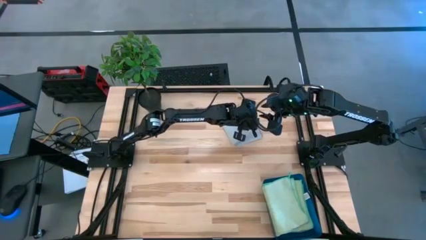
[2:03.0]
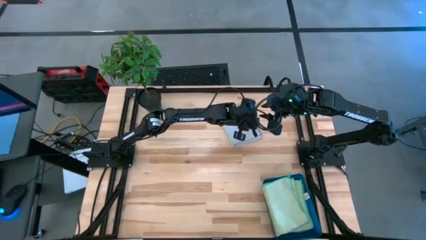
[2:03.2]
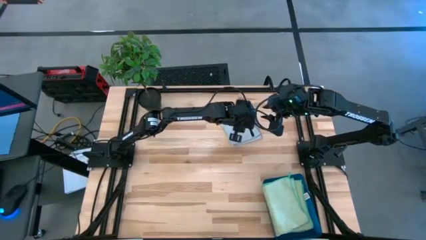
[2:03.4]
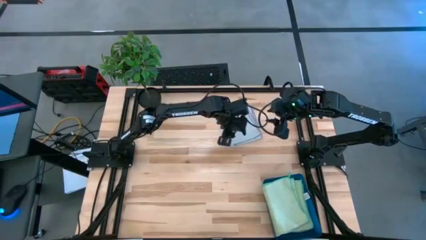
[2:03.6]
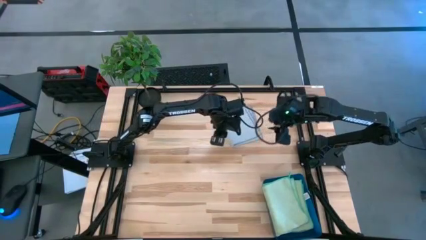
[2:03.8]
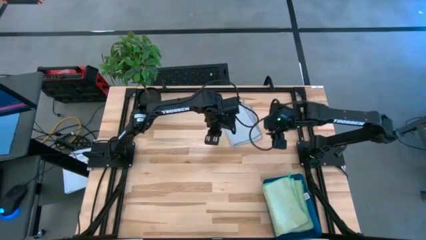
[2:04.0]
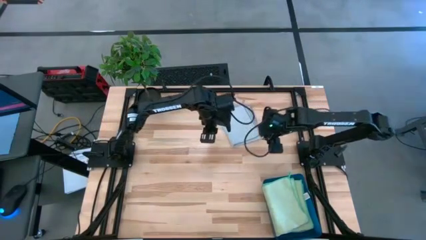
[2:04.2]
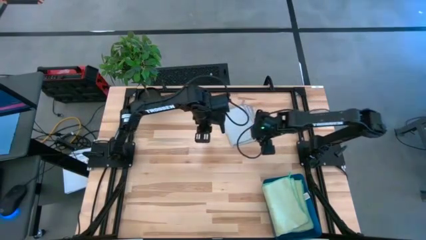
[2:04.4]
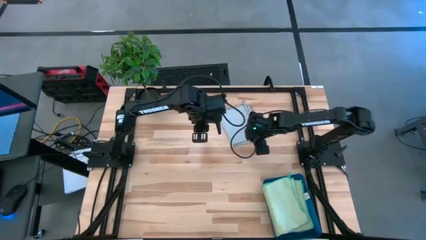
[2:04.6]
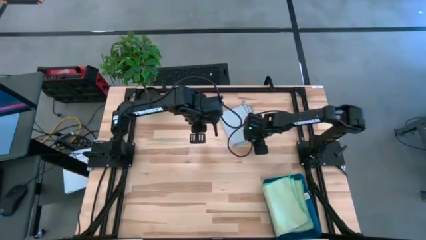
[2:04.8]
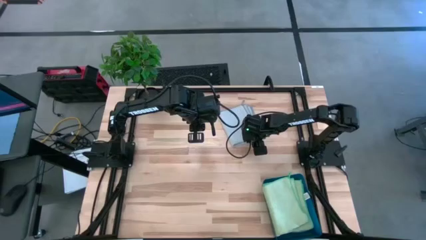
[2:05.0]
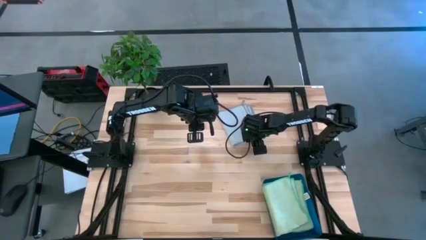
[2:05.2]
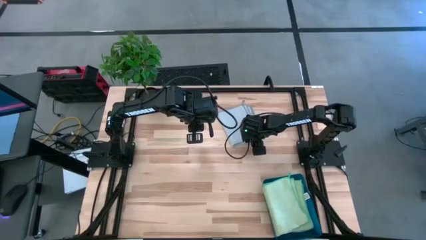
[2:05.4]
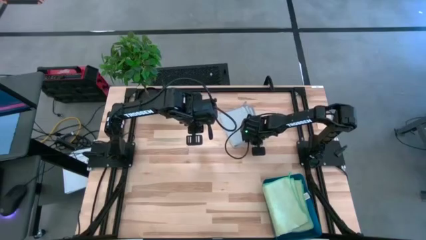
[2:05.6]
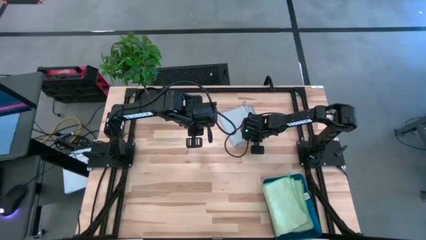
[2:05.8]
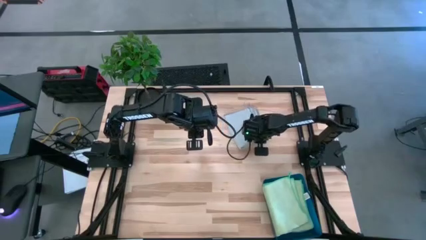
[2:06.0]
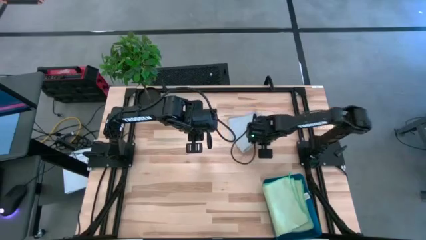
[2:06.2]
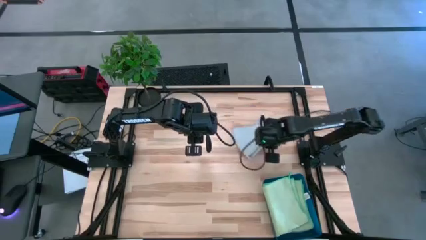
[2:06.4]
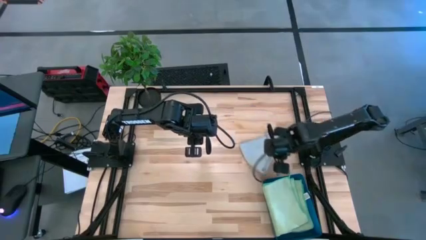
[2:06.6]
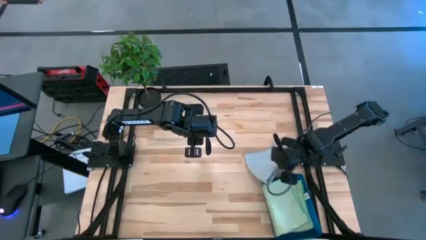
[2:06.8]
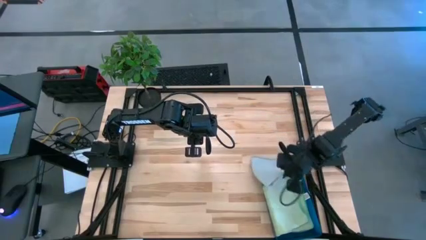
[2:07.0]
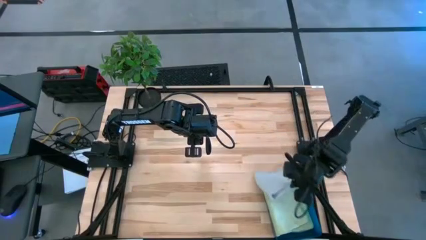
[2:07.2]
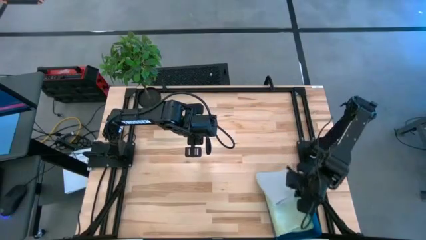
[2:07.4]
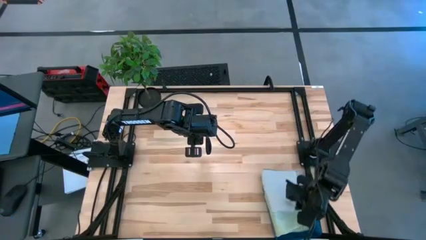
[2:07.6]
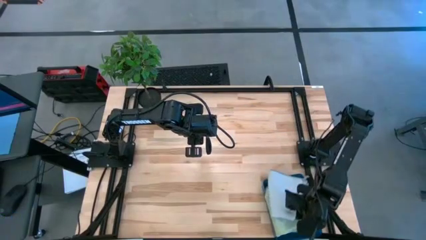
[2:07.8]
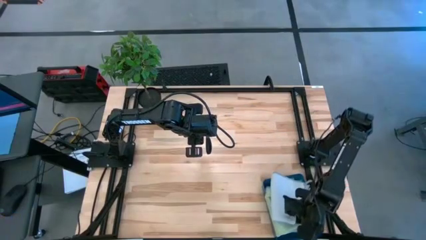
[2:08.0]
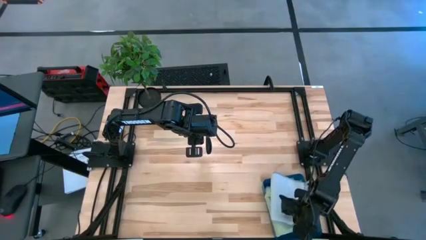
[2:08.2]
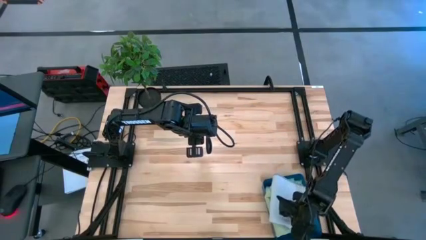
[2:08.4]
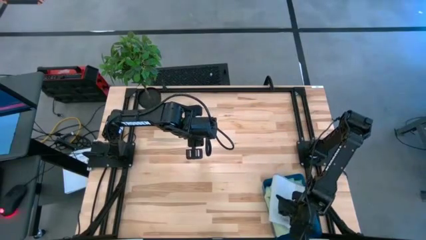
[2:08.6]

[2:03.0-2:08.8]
Task: Fold microfiber towels
Put the gray microfiber towel into the blue bin

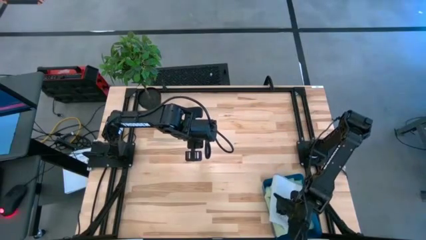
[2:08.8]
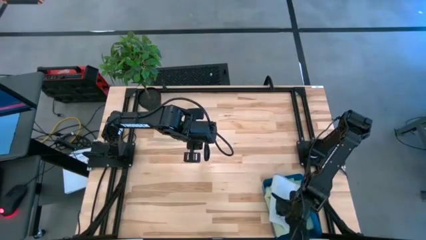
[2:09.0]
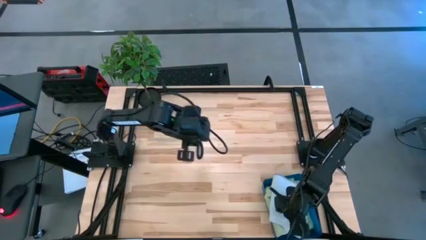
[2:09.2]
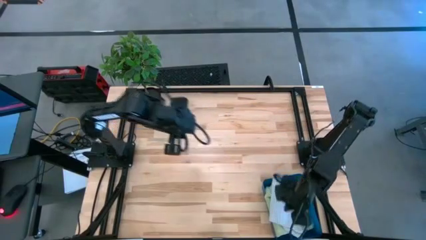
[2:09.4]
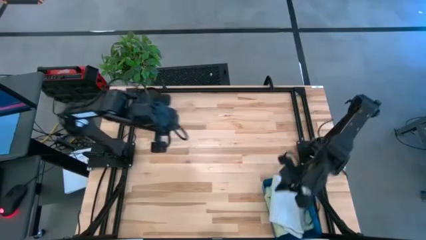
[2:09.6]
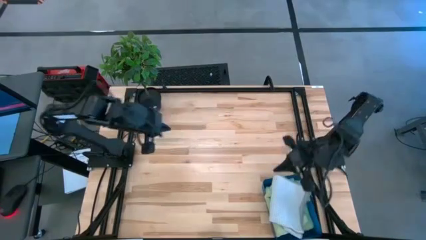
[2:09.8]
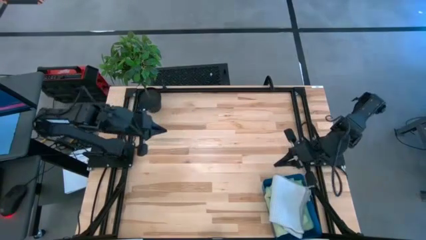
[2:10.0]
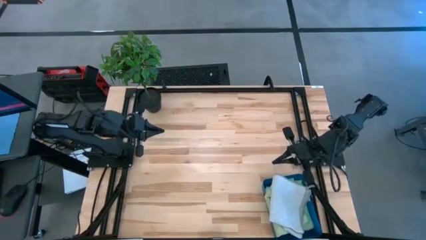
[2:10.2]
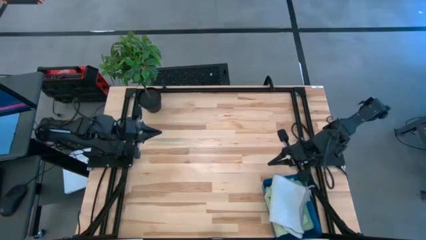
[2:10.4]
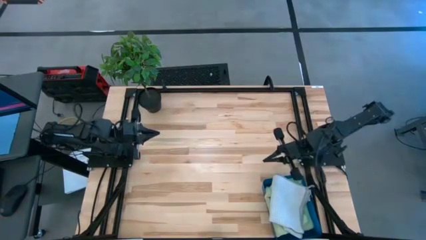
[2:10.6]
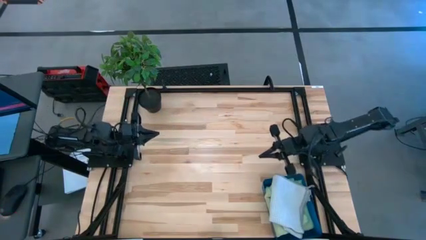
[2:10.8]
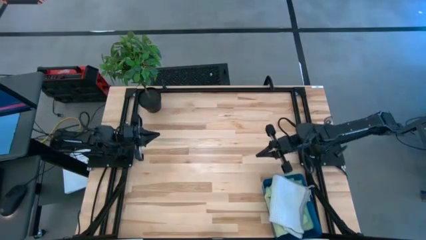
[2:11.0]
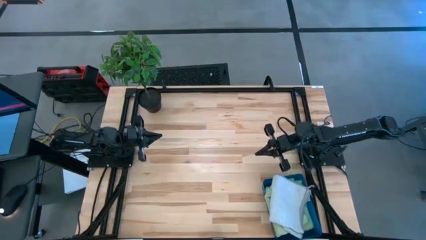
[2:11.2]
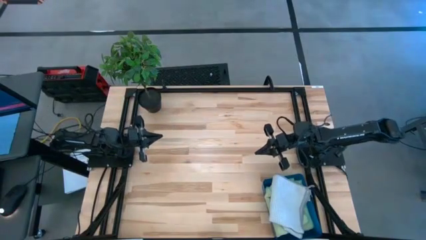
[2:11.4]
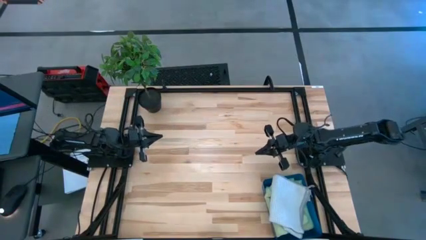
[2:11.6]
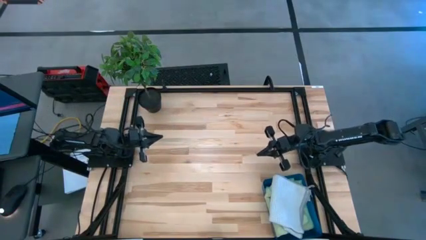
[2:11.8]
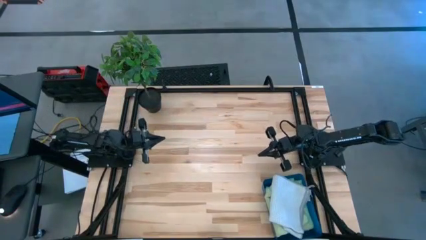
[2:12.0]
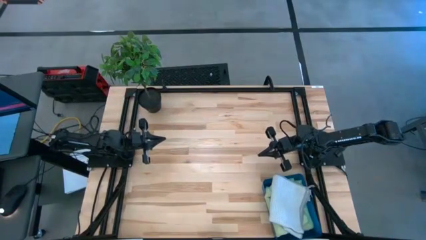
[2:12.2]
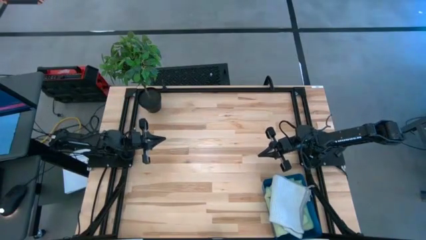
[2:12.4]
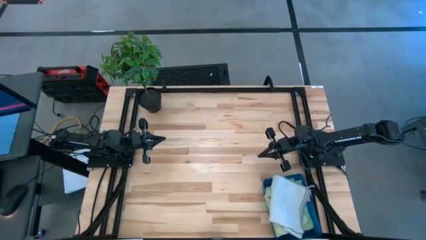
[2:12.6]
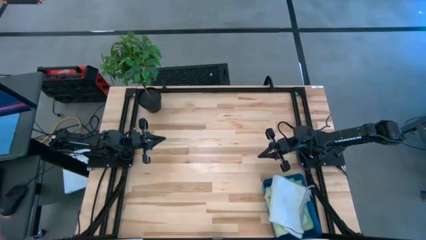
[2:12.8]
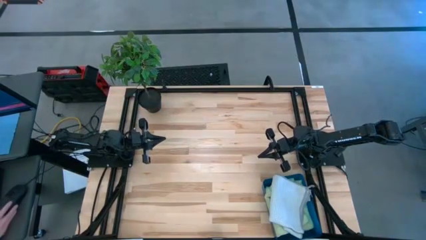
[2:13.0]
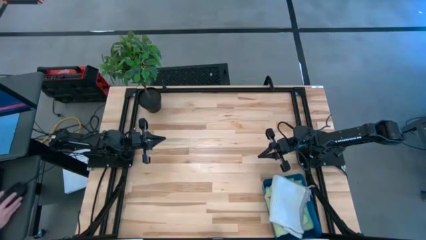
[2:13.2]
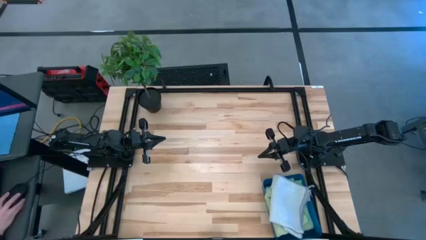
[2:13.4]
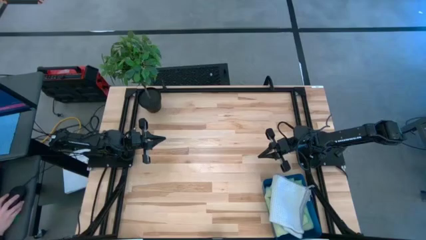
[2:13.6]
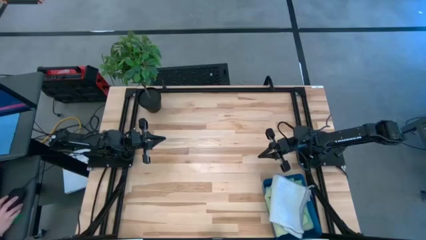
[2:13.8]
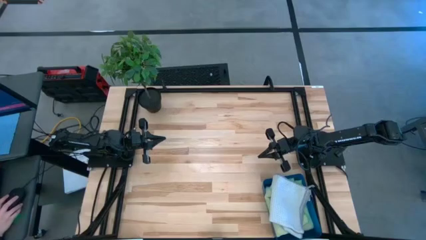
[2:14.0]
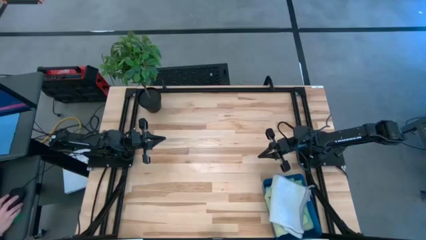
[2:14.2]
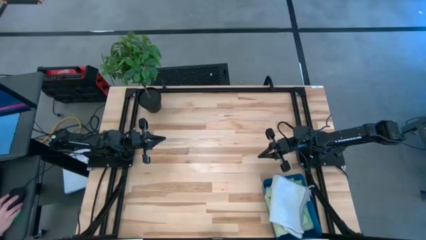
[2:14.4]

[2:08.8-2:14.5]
Return to Home Position
